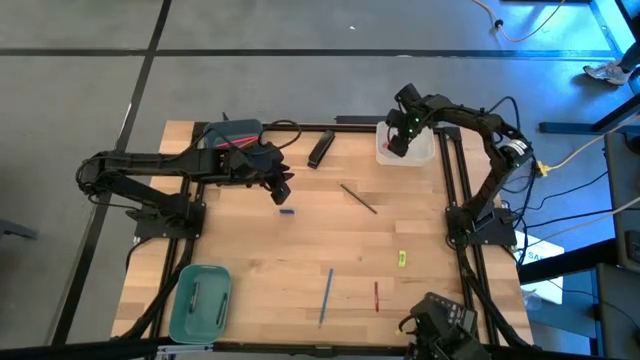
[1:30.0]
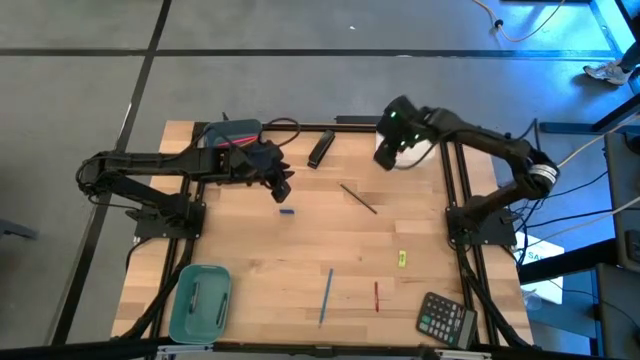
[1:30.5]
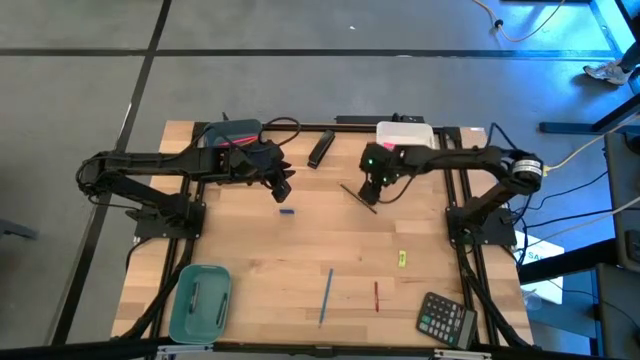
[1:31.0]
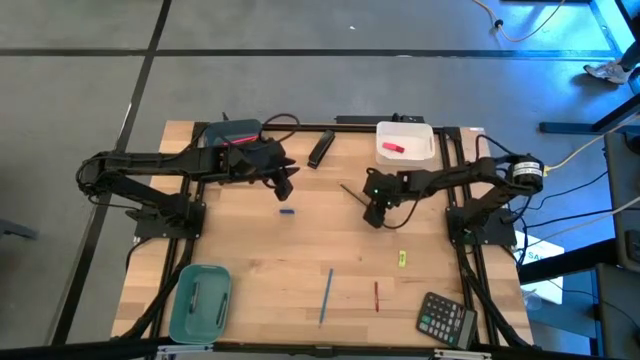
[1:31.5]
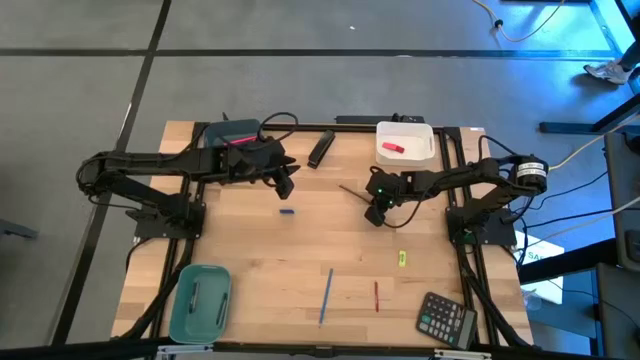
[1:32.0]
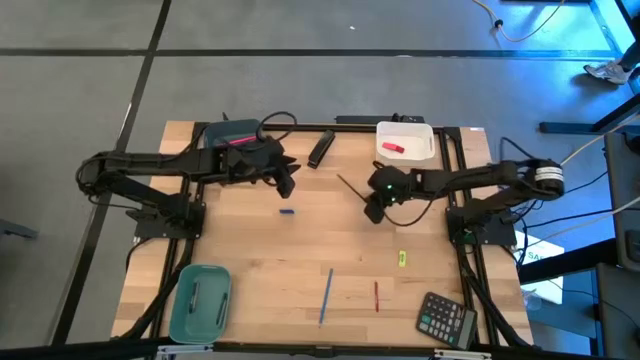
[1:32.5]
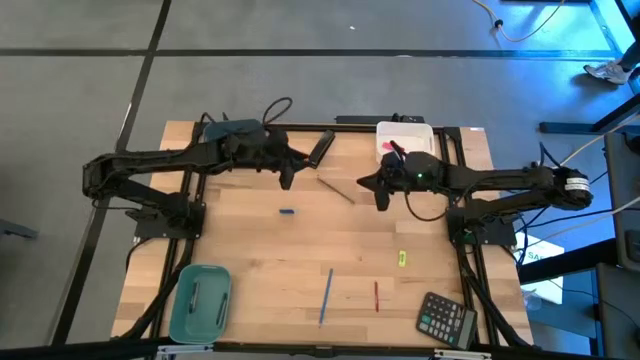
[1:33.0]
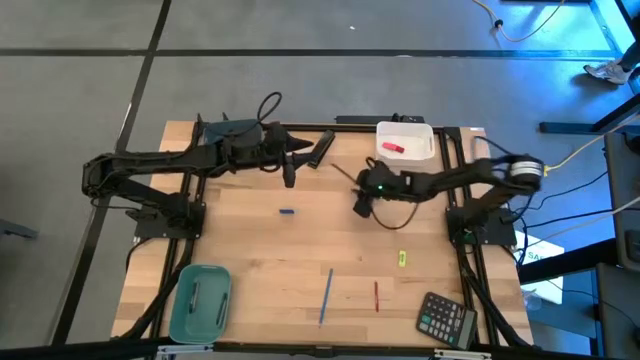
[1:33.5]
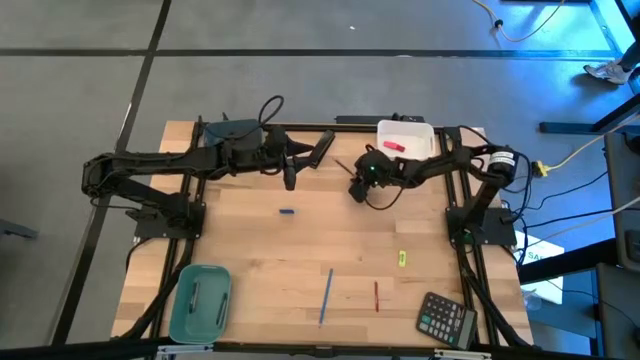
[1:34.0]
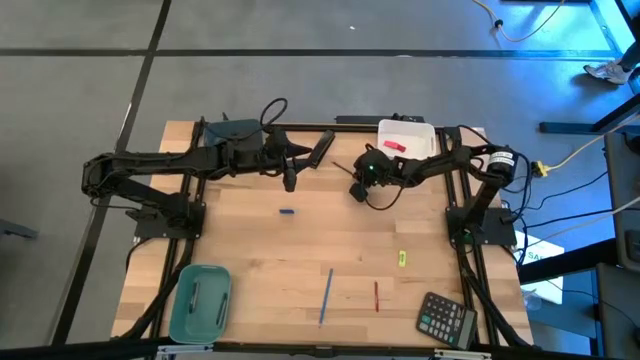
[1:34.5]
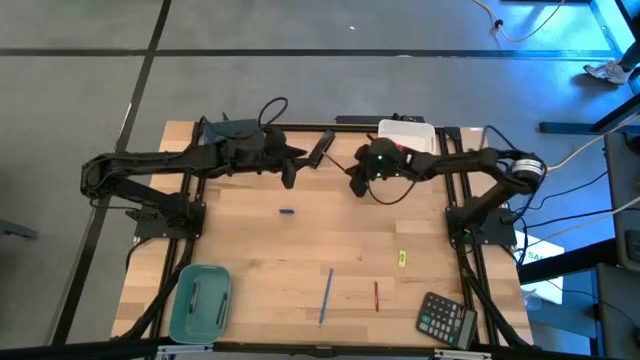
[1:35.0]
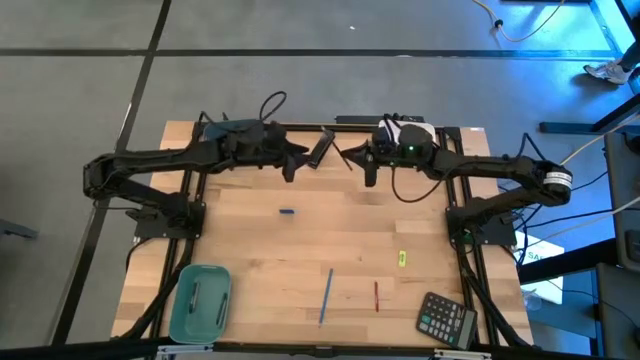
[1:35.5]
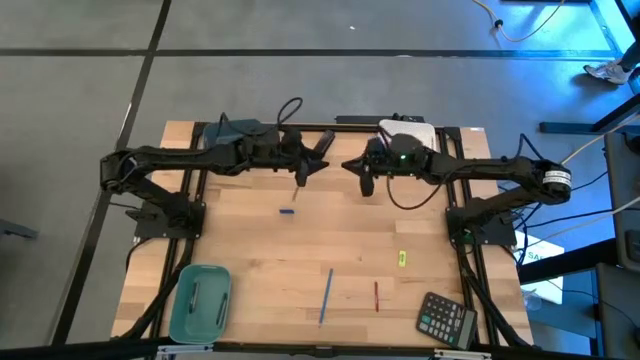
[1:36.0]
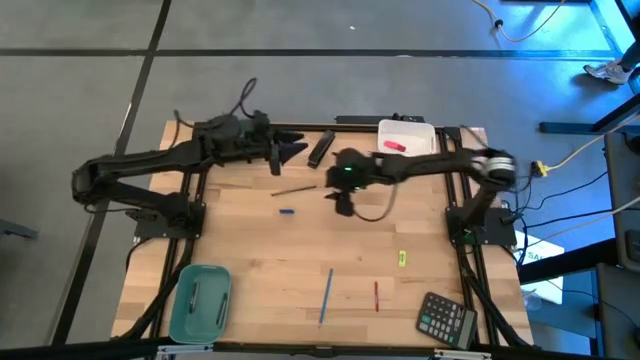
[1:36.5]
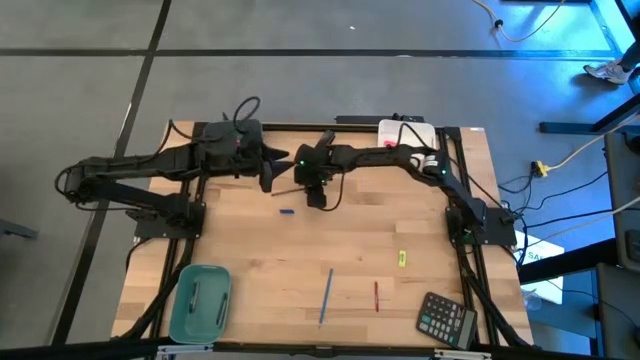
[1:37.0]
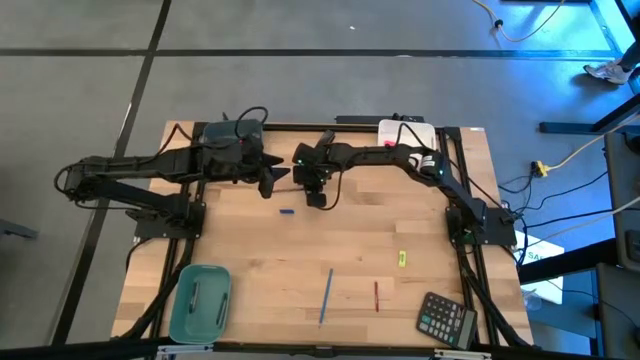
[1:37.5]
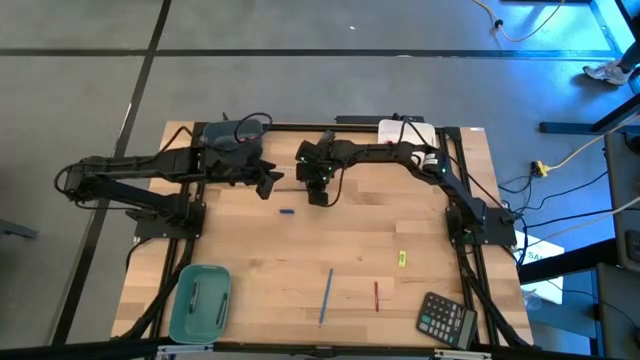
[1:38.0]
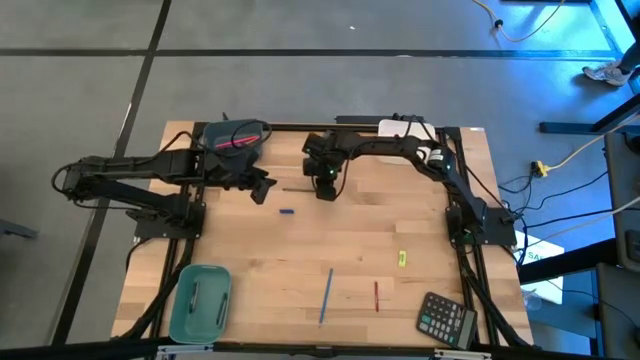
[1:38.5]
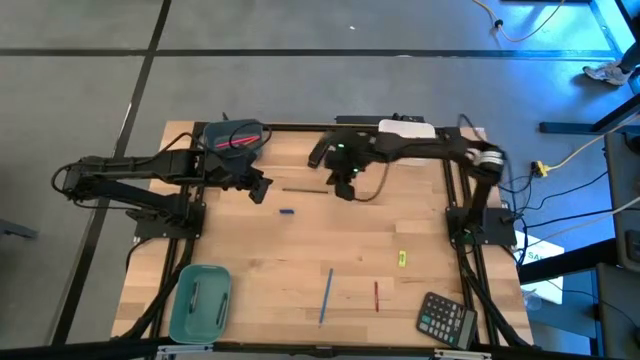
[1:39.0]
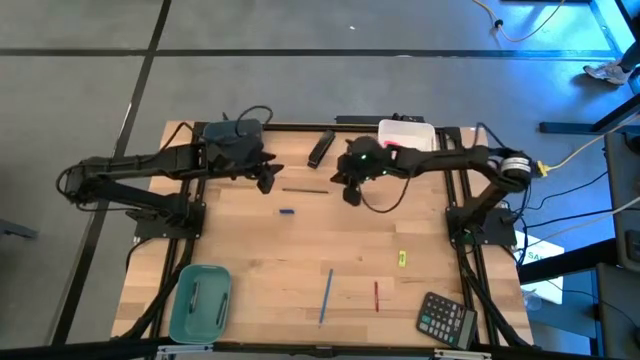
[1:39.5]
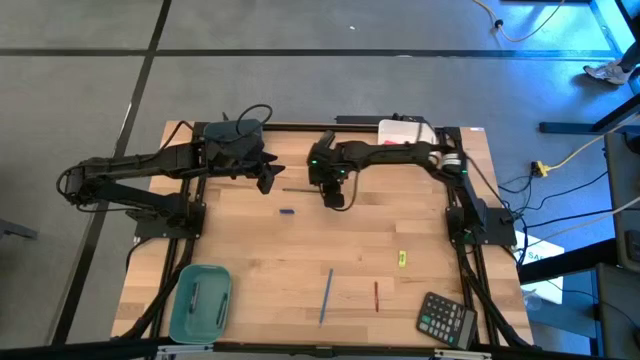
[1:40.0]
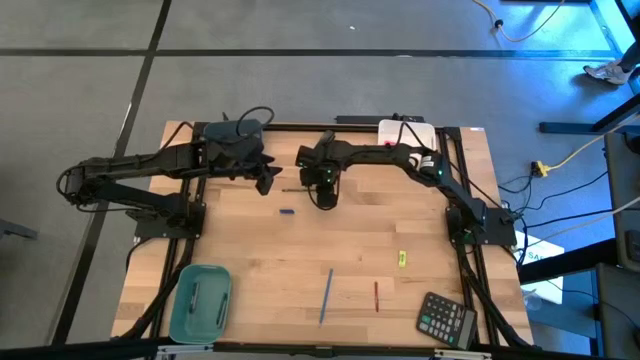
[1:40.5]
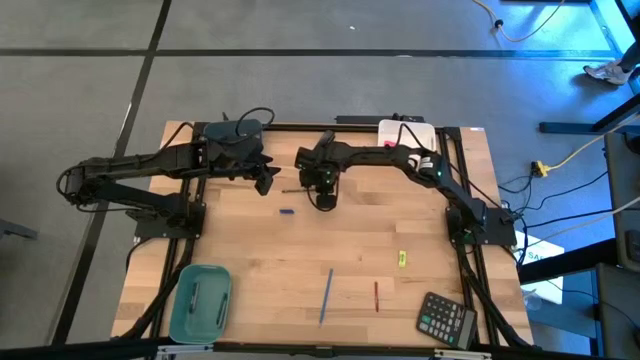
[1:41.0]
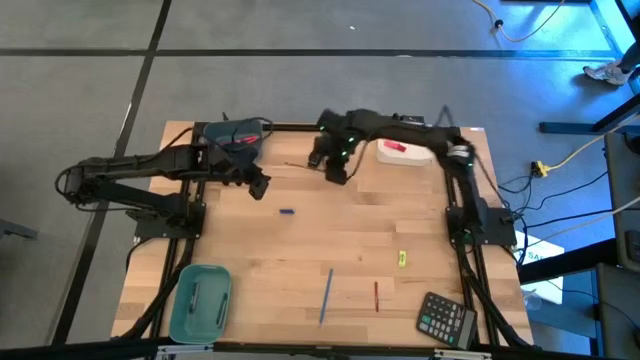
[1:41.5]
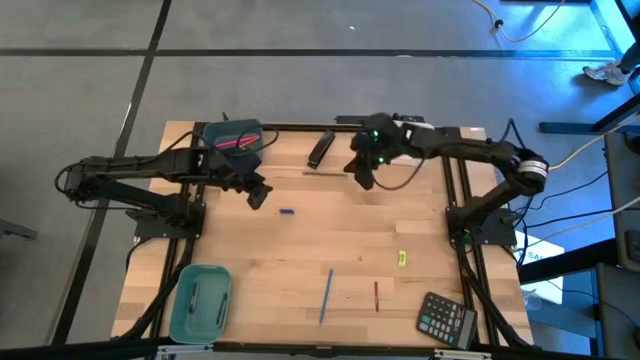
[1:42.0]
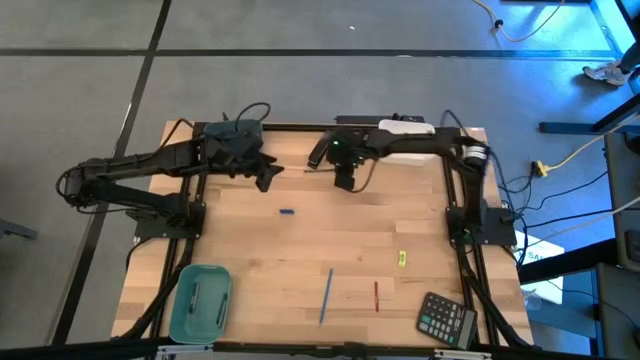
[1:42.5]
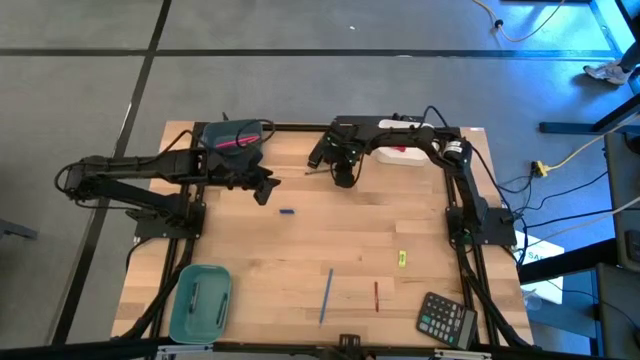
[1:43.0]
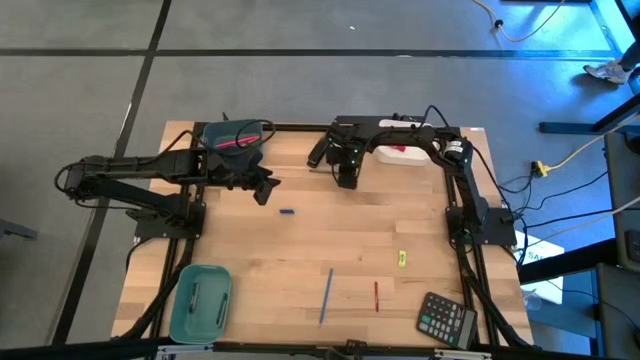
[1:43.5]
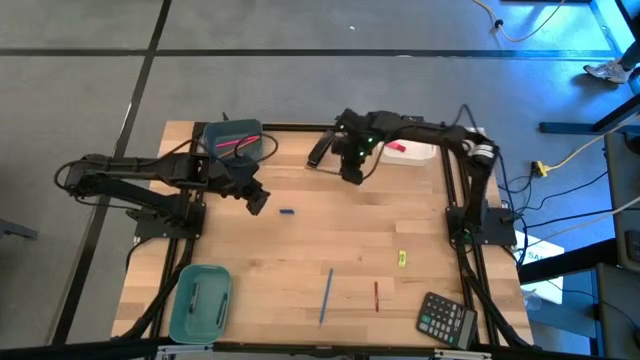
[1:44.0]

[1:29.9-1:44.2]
Task: Sort crayons/erasers/pens/pencils in bins
Put the black pencil into the blue bin

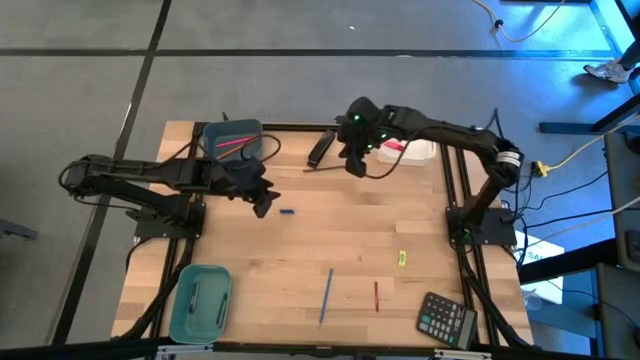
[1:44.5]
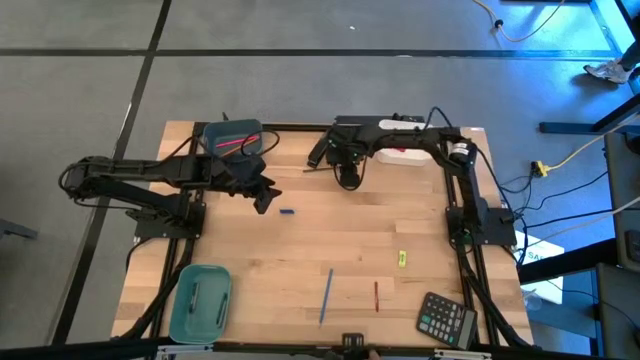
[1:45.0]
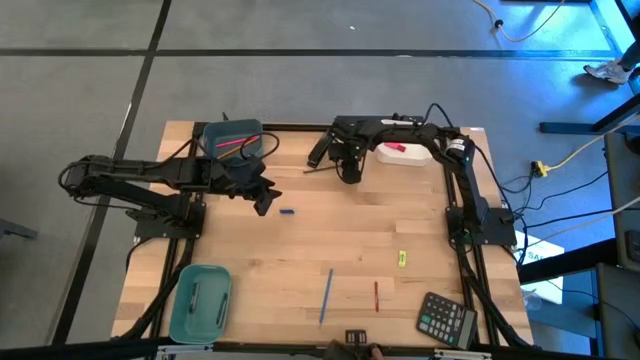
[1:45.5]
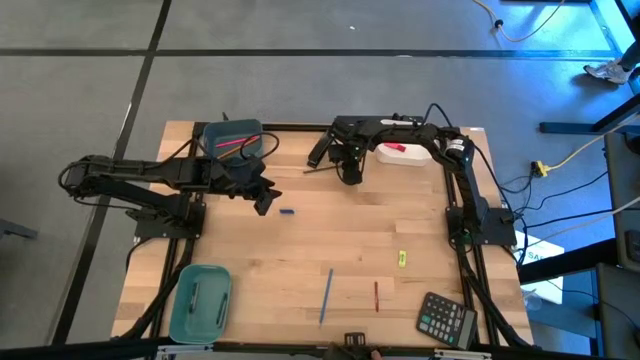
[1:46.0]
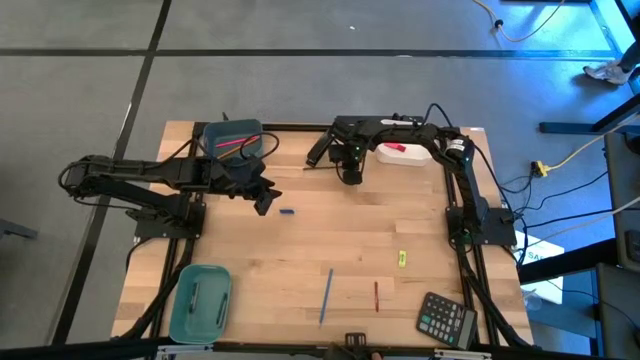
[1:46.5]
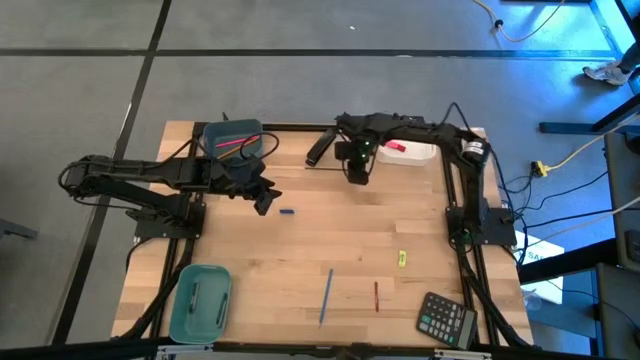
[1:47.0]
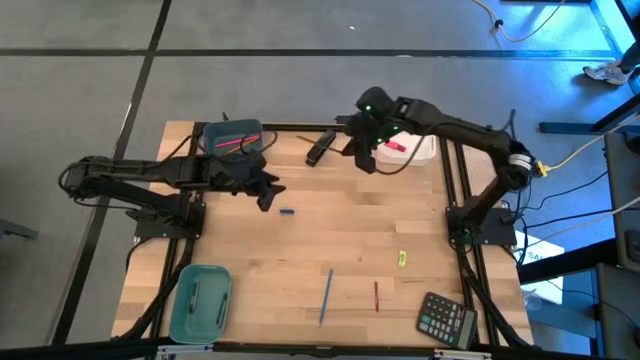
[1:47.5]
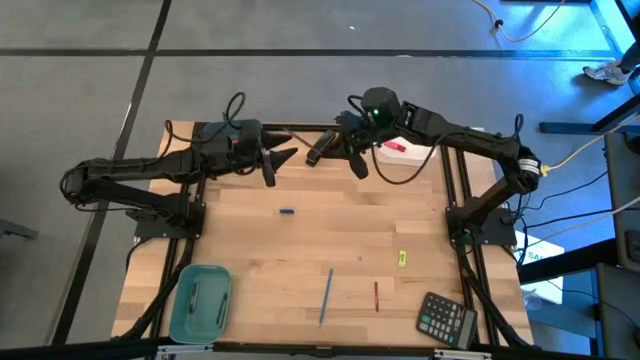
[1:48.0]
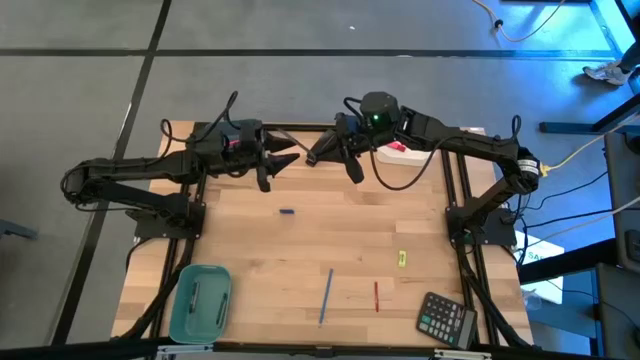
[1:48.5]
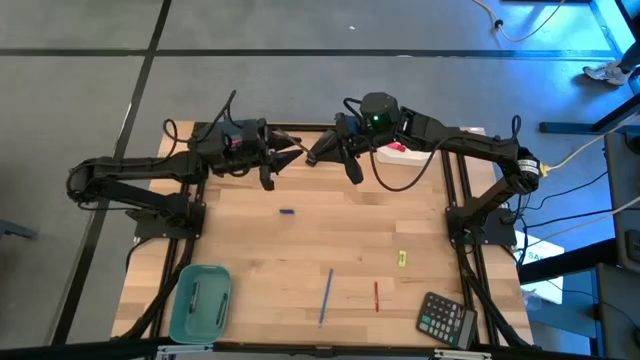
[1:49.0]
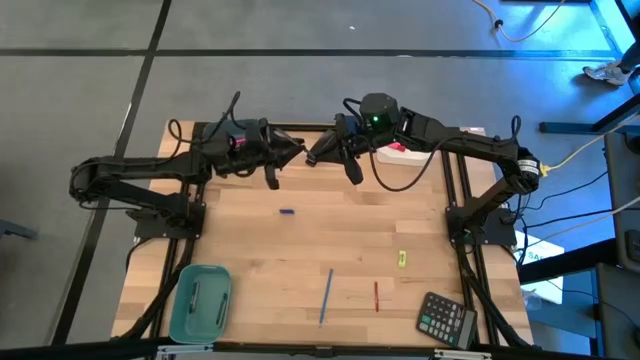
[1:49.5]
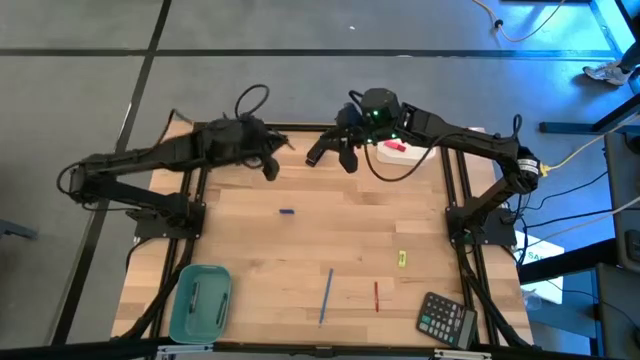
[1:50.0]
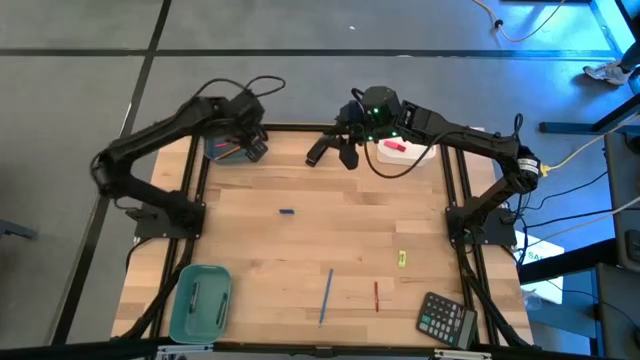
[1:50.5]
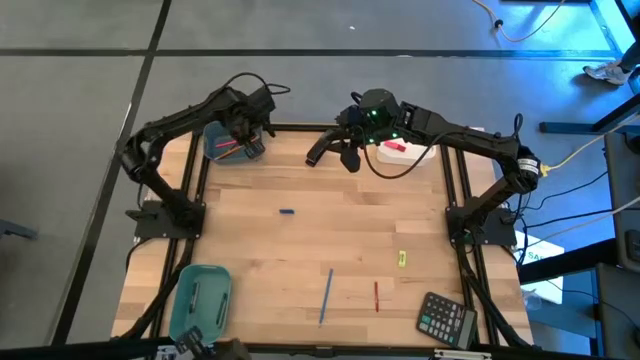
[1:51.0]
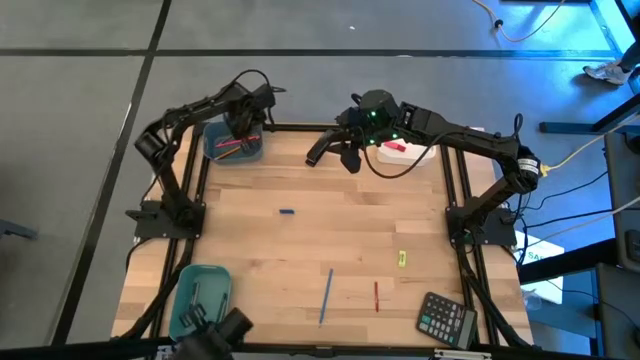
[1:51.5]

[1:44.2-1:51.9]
Put the black pencil into the blue bin
